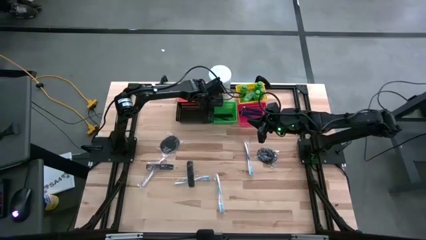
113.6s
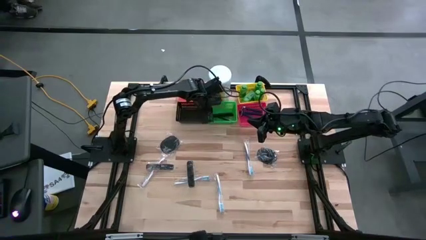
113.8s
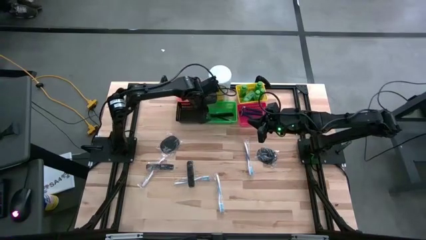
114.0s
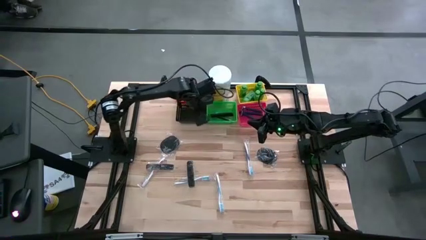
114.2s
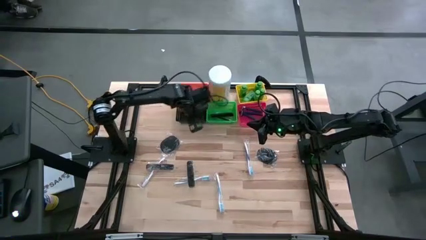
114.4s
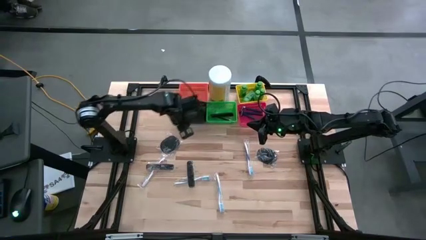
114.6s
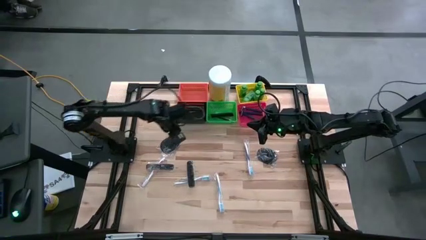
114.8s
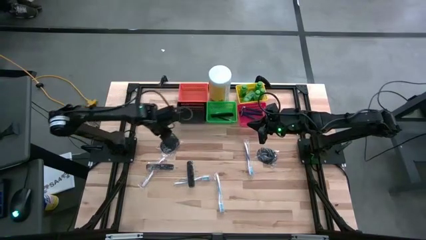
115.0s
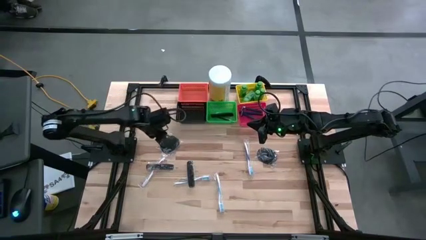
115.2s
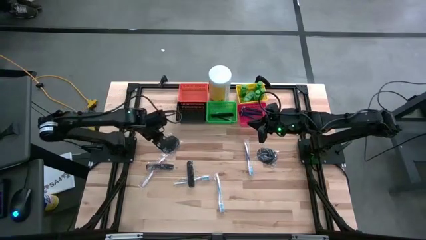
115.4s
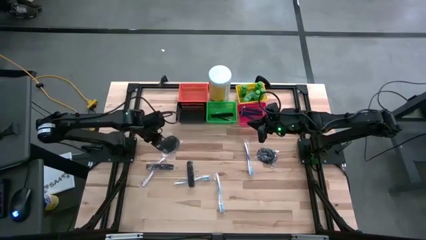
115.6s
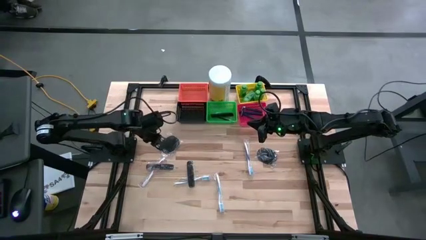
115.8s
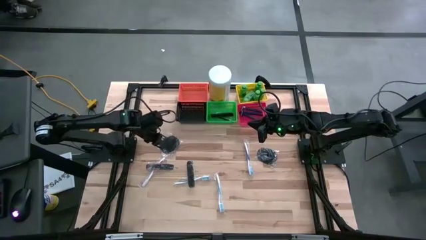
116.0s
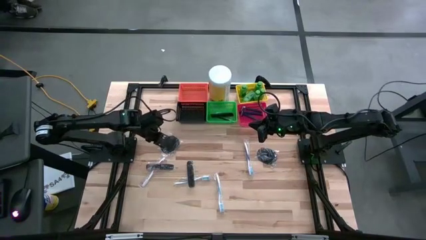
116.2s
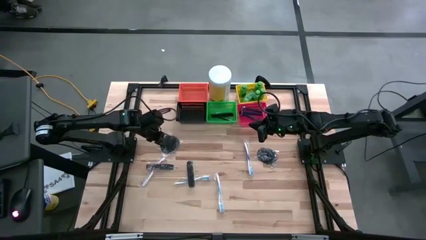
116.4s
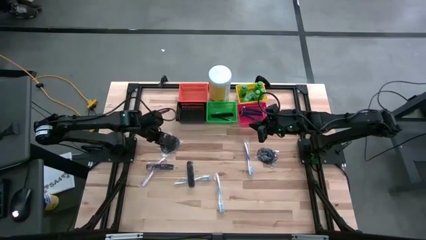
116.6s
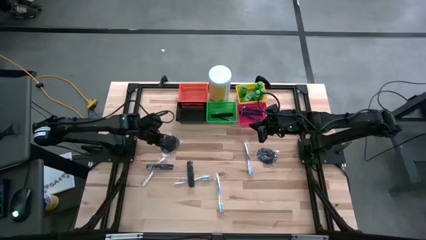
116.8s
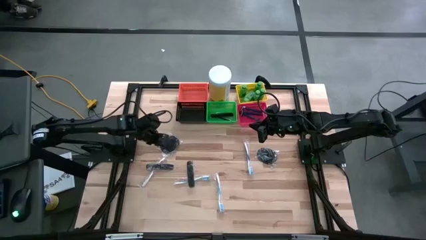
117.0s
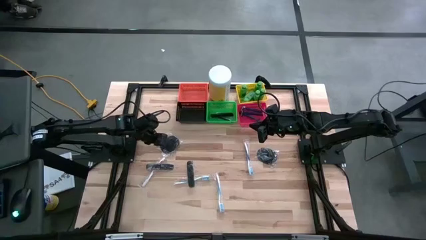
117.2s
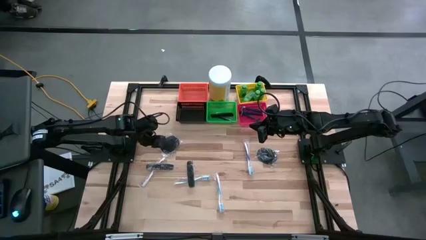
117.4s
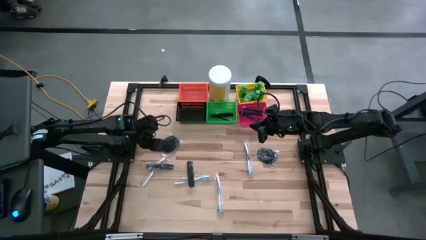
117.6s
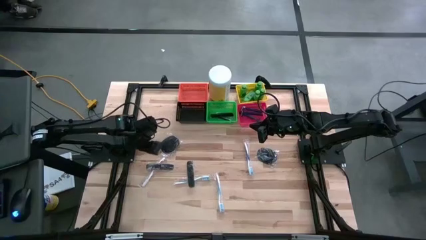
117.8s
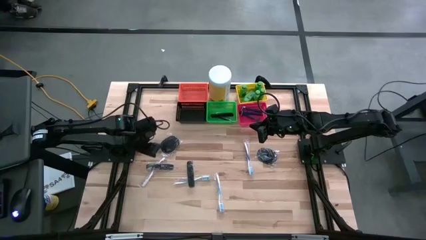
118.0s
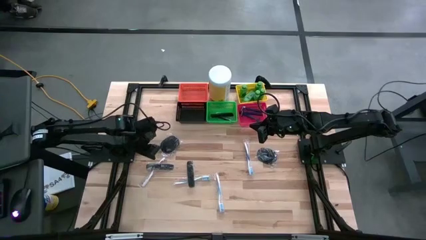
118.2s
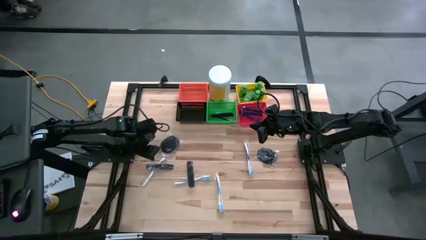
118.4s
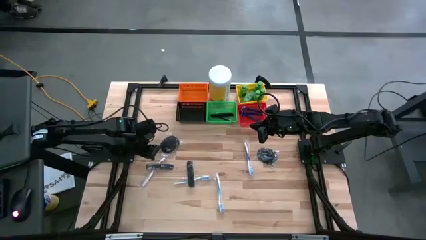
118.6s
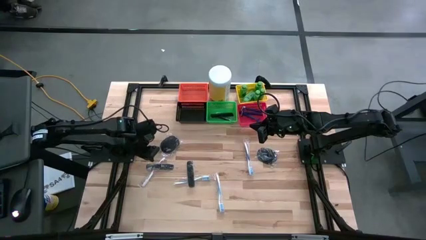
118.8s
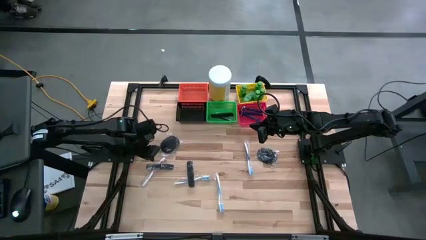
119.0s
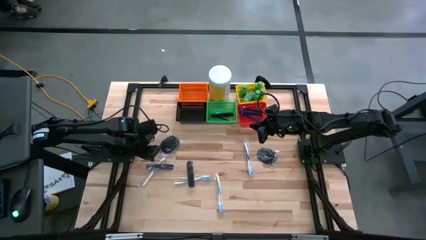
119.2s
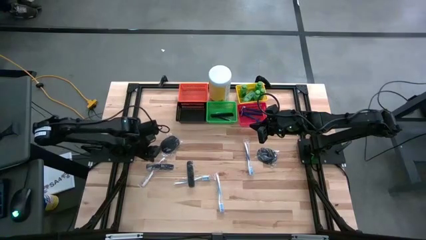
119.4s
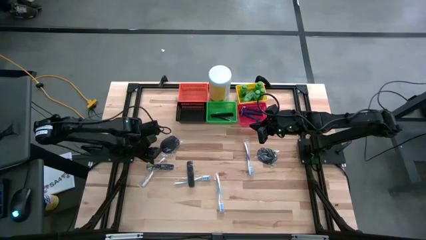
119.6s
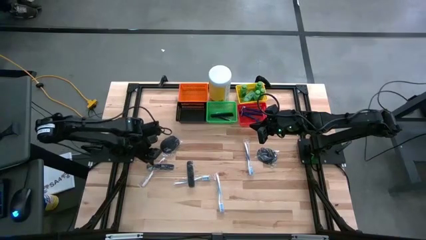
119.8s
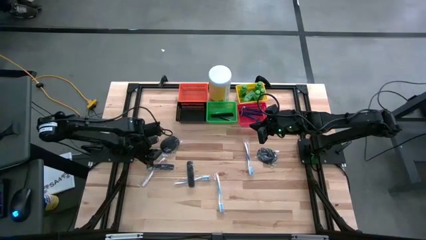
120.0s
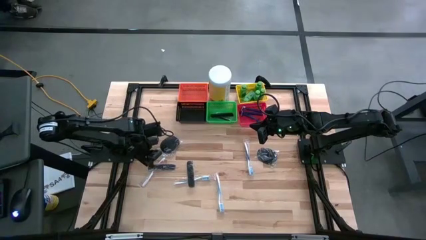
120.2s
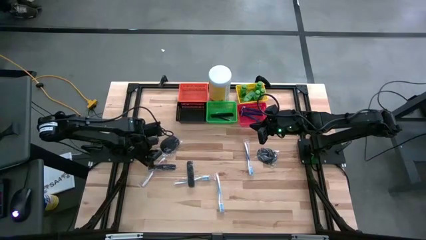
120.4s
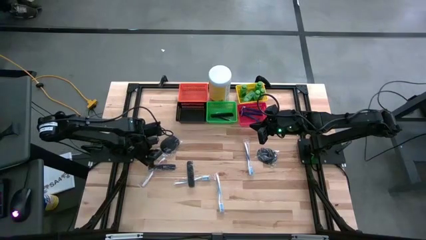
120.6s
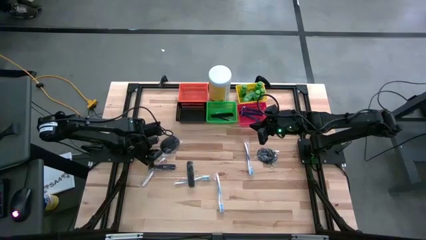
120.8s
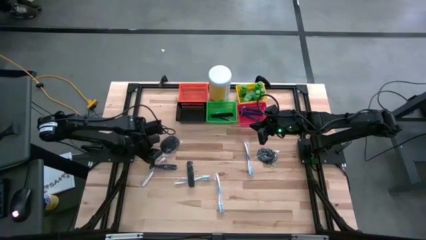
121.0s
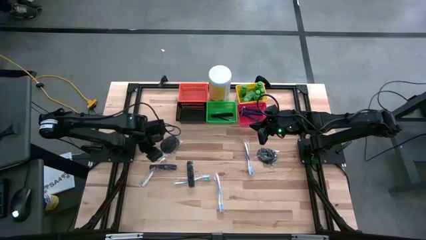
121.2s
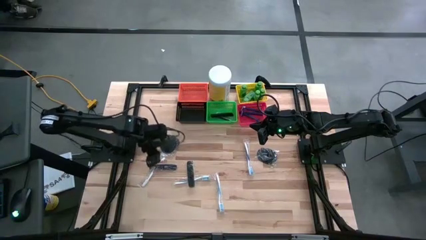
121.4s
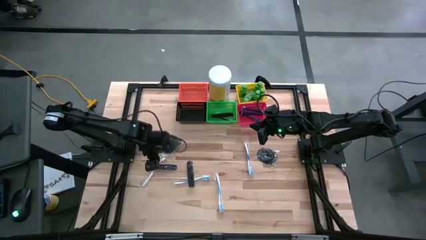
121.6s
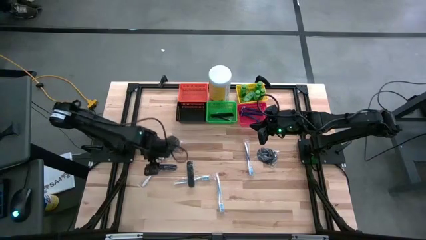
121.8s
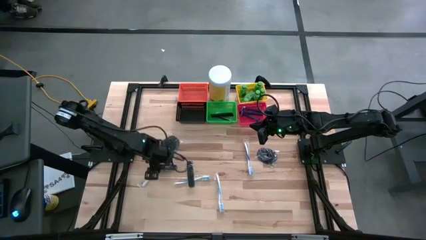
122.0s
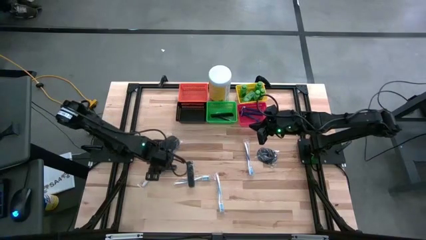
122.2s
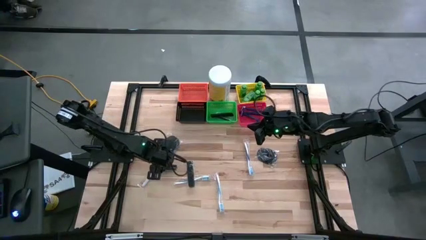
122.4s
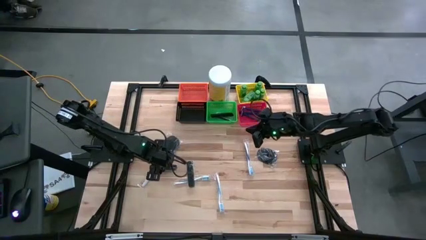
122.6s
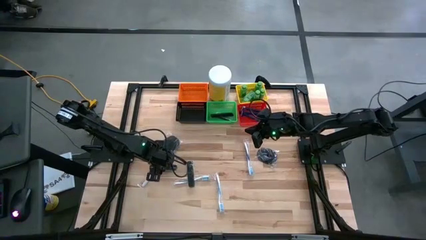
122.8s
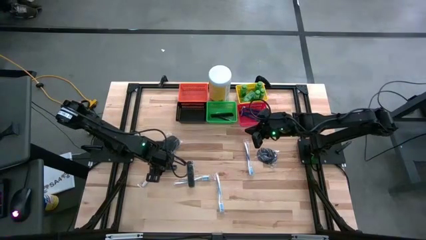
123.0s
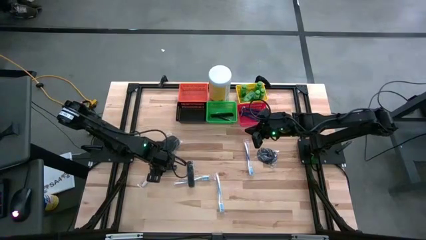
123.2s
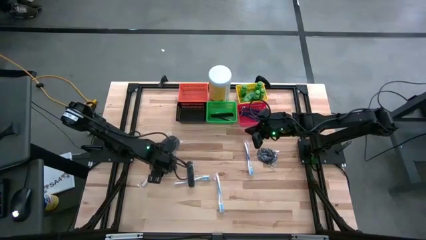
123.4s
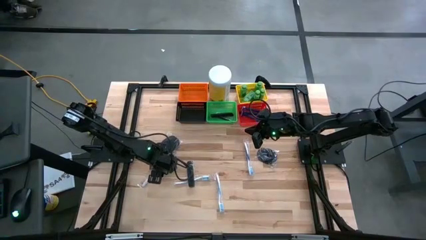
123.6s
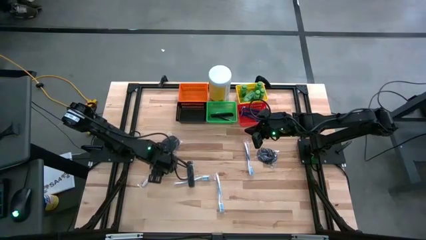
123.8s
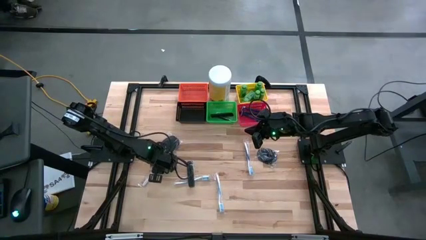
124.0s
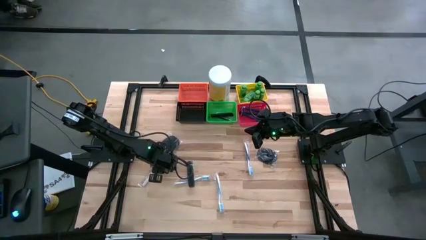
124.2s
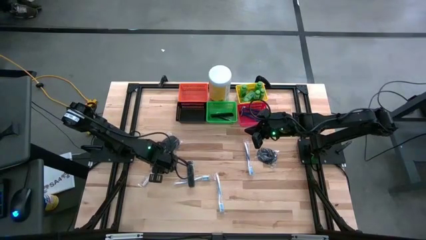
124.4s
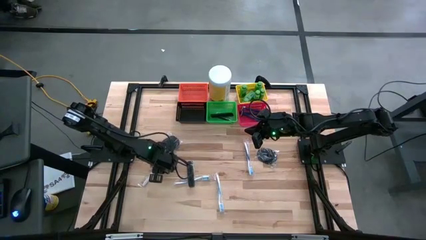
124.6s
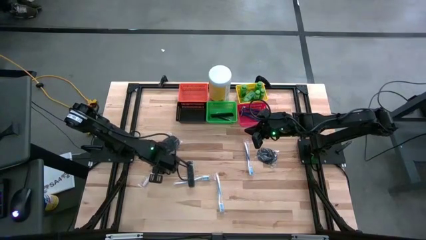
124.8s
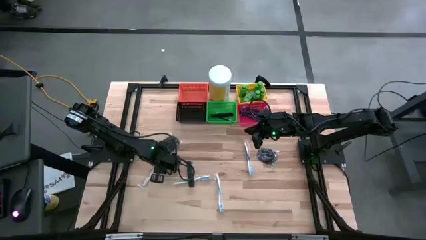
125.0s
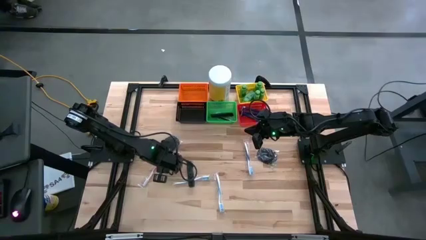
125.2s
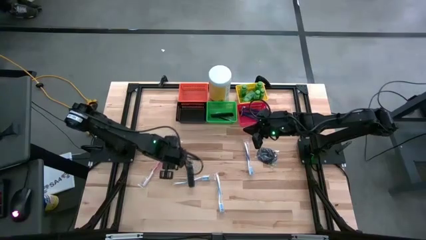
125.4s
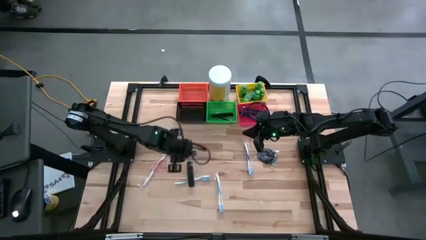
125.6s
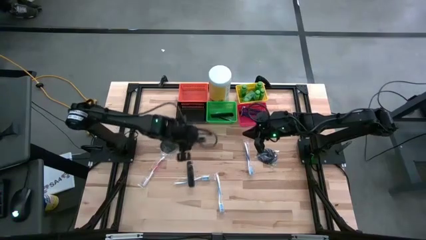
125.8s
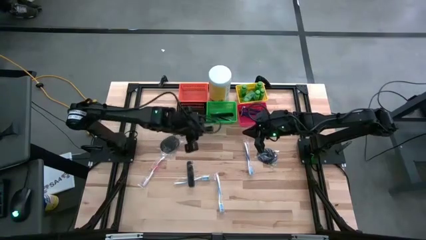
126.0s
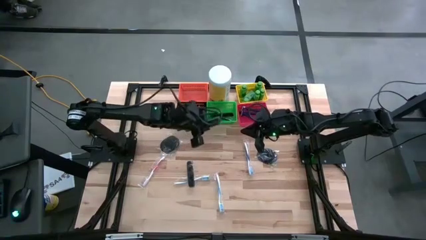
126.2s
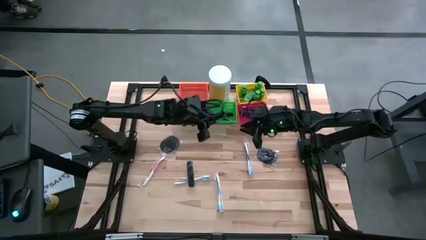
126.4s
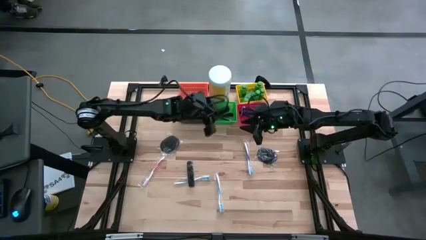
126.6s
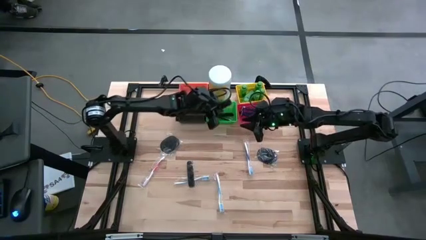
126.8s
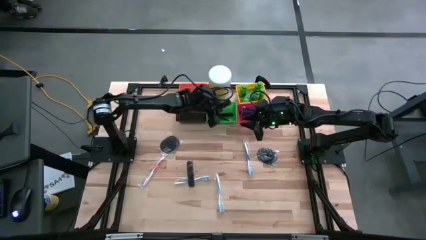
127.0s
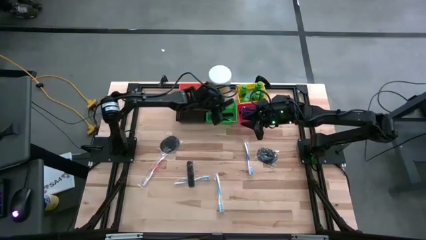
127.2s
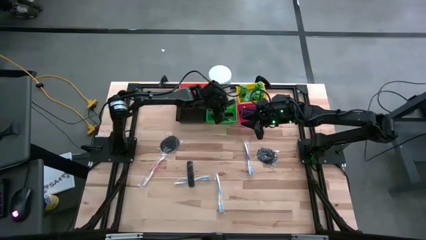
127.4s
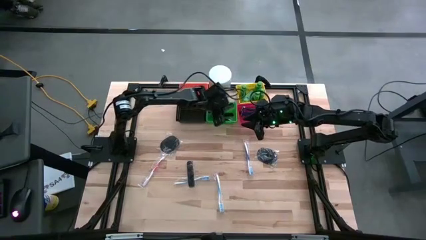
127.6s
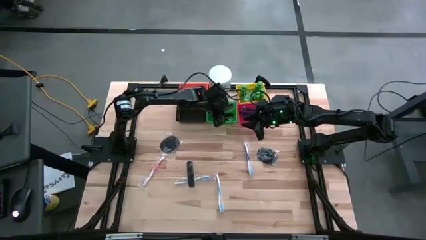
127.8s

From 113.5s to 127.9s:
Task: Pick & Place Travel size toiletries
Put the black comb into the green bin
